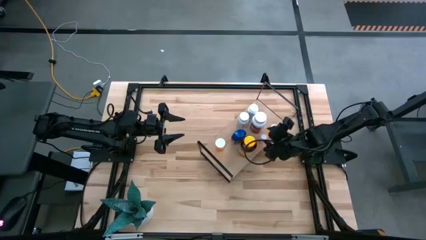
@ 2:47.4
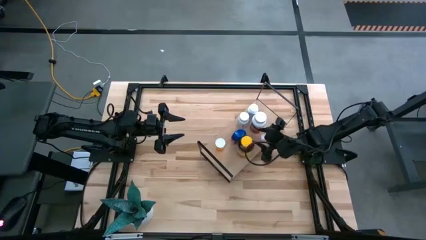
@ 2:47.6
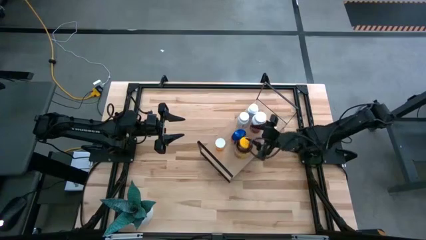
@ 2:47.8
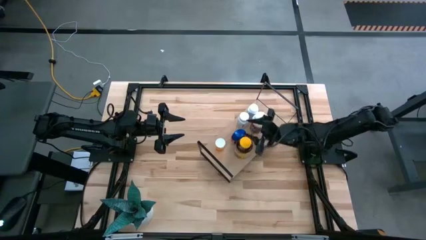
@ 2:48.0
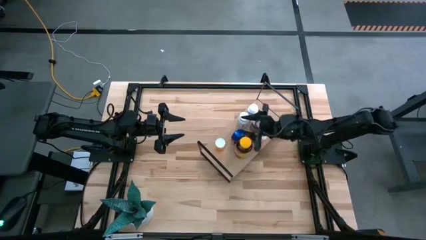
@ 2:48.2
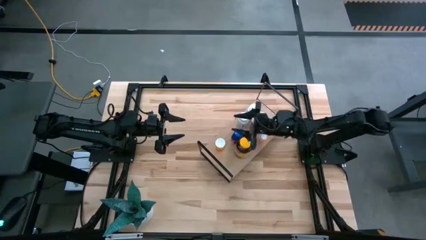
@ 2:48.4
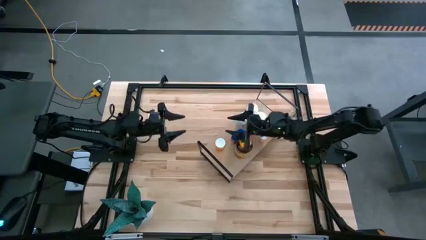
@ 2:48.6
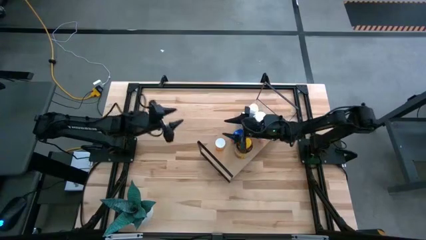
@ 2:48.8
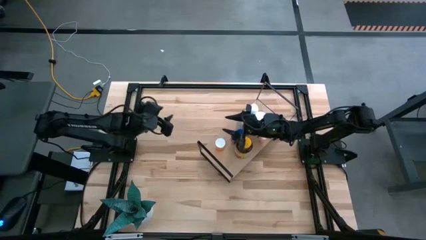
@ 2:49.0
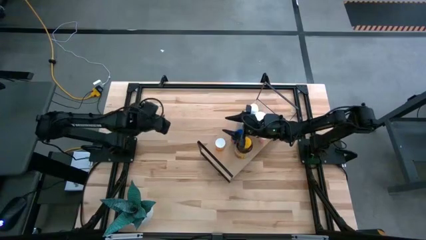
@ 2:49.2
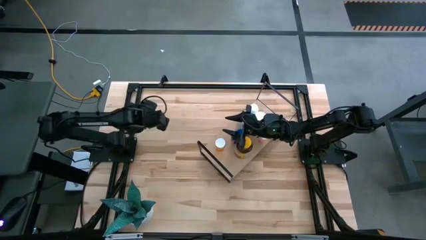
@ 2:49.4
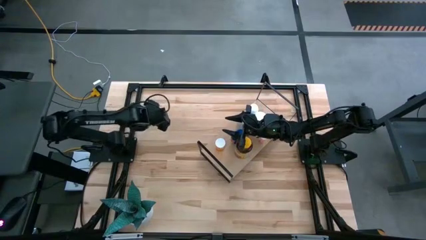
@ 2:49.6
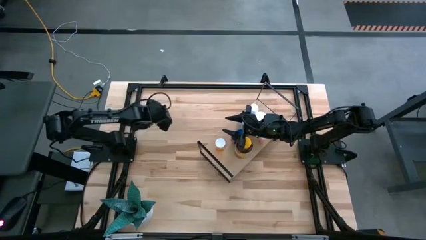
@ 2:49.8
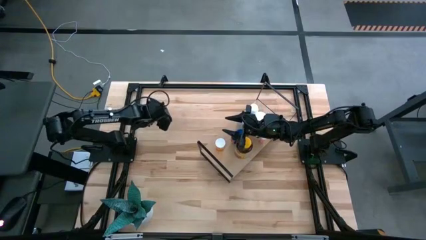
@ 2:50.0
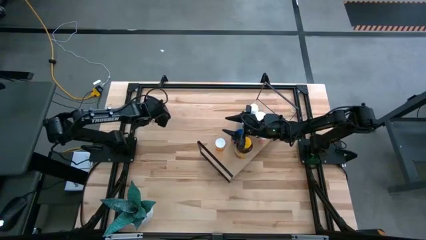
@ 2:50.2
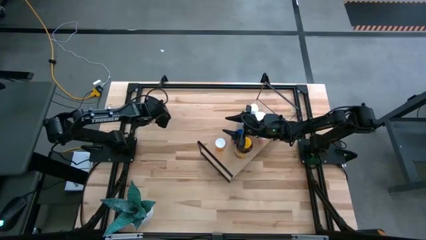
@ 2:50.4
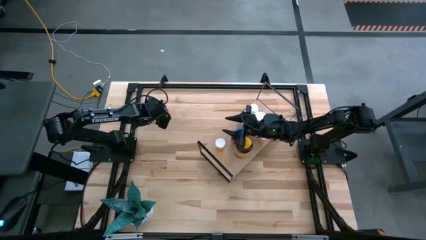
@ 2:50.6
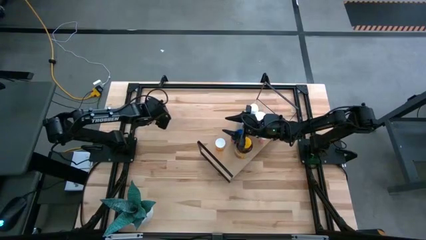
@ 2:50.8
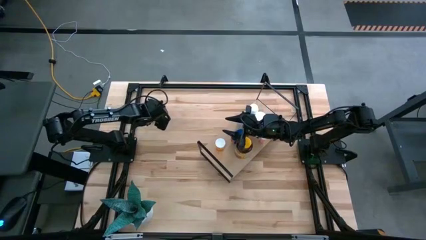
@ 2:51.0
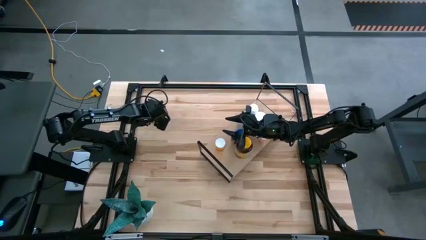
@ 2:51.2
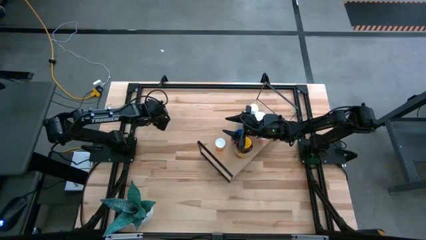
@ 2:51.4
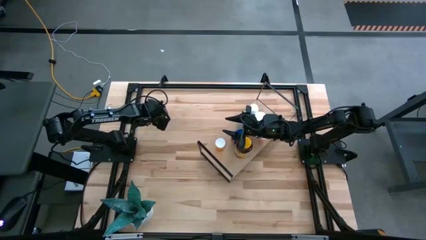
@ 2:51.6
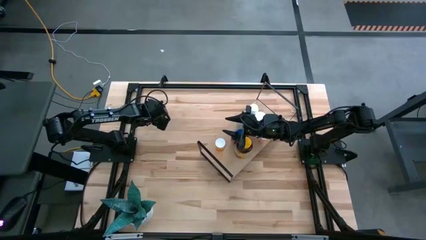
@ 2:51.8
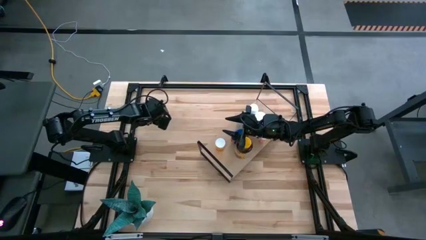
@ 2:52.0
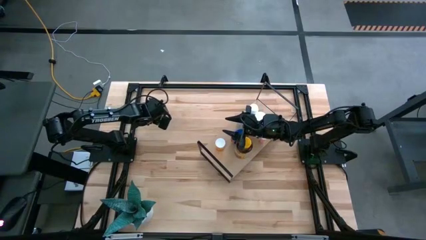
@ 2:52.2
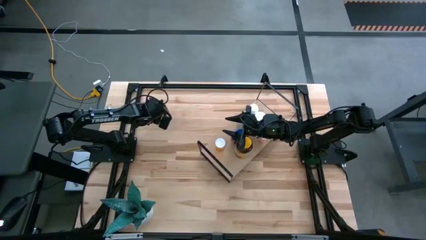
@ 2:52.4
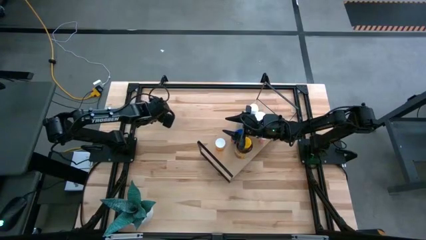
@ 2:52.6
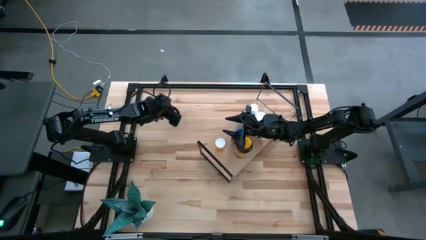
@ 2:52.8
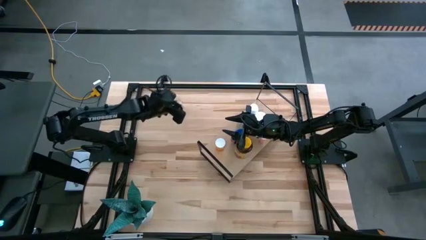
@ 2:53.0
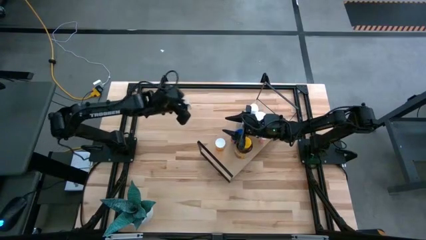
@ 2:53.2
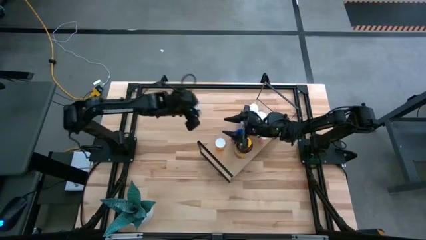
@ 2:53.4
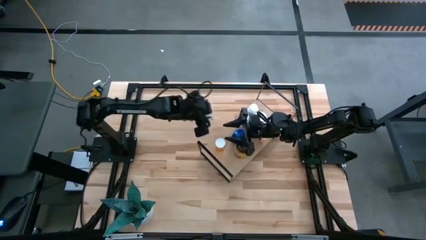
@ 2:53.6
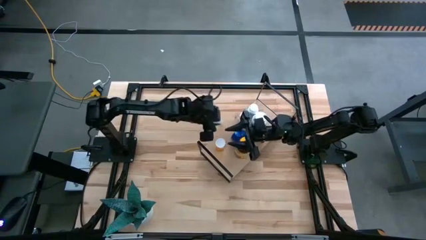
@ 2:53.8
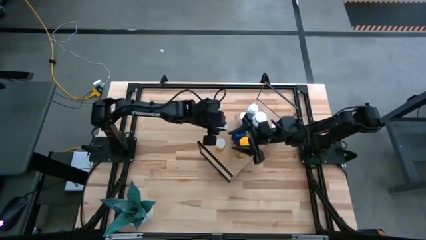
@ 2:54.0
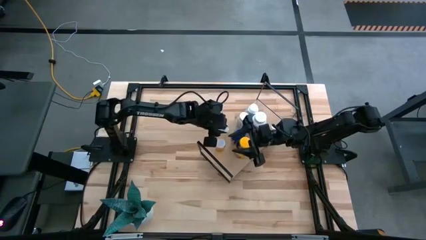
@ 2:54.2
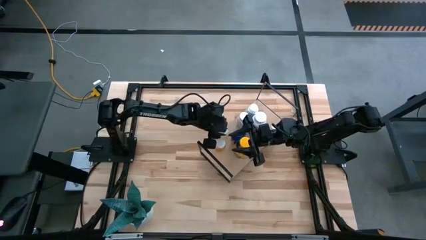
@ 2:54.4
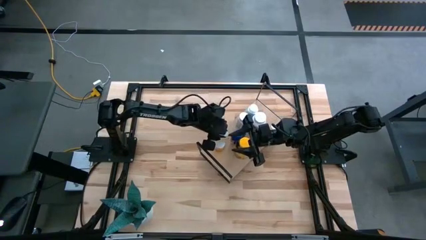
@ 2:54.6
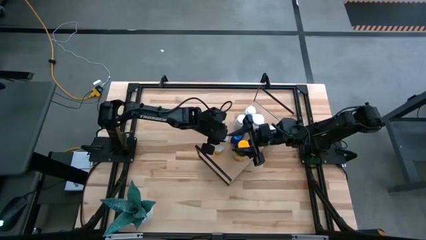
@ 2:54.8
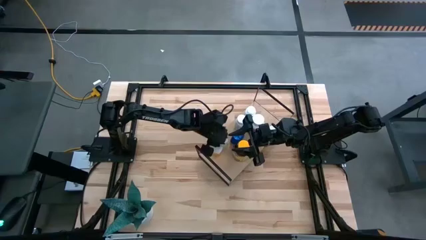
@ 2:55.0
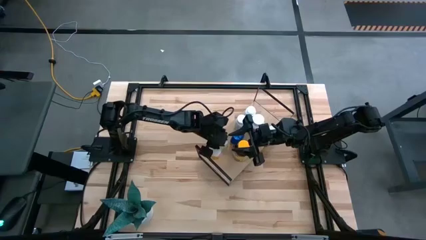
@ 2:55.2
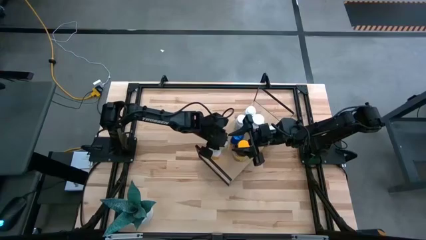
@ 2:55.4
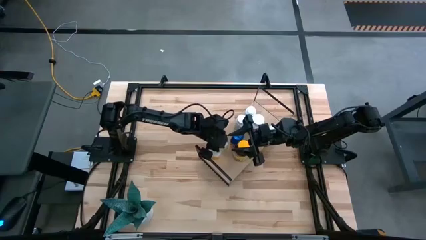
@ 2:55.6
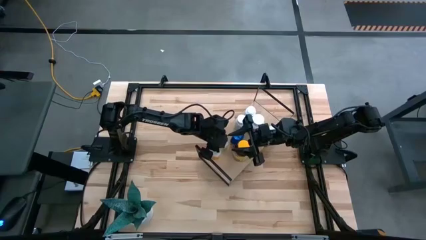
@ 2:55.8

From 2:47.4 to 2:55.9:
Task: Pick and place medicine bottles onto shelf by color
Put the yellow pill bottle on the shelf

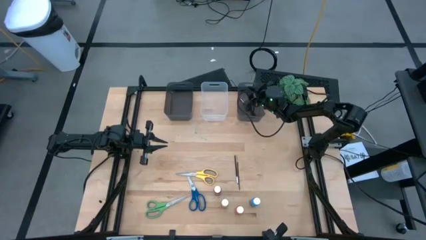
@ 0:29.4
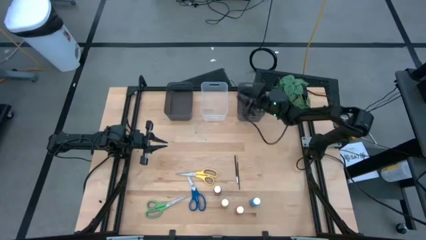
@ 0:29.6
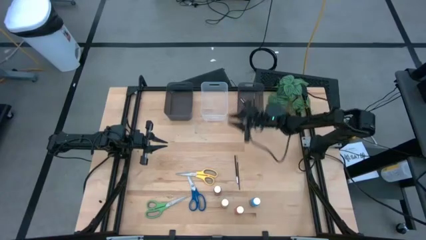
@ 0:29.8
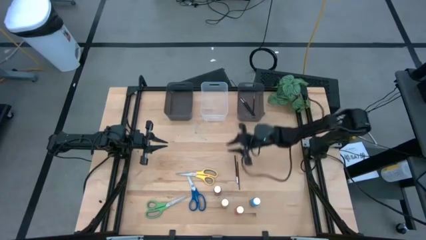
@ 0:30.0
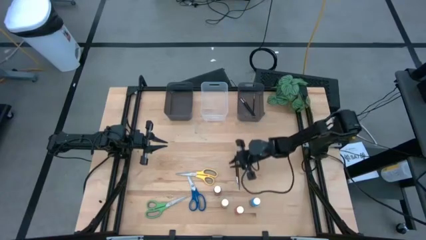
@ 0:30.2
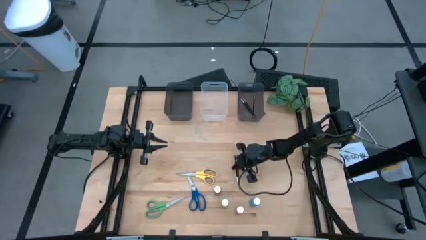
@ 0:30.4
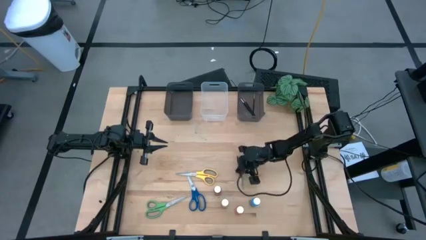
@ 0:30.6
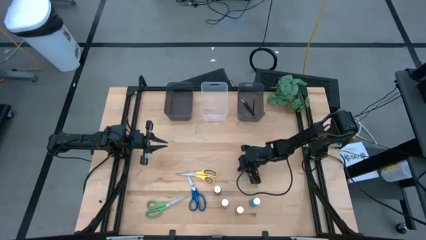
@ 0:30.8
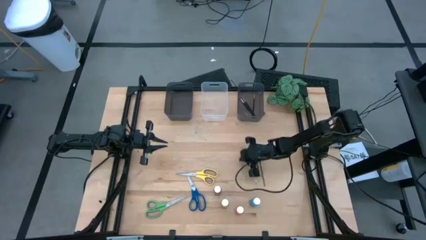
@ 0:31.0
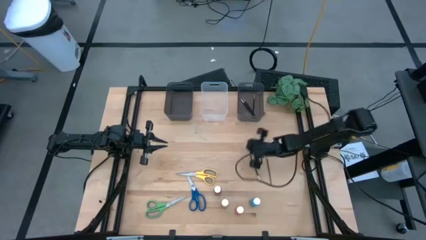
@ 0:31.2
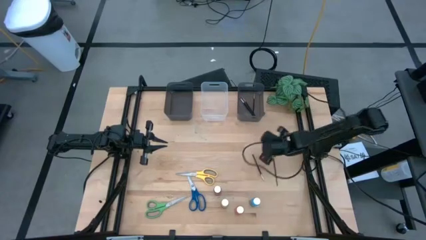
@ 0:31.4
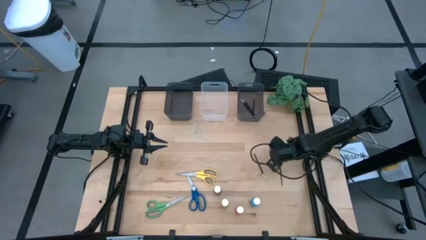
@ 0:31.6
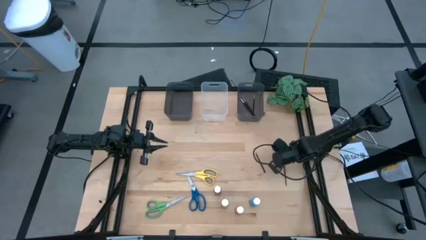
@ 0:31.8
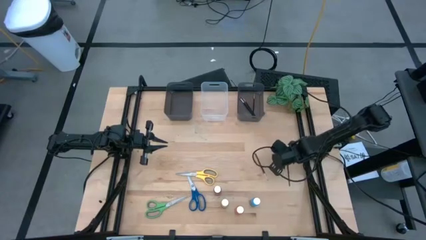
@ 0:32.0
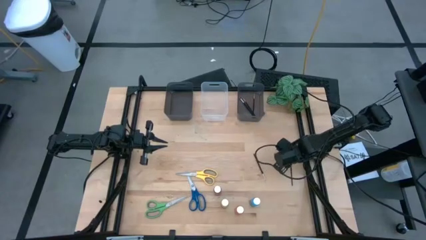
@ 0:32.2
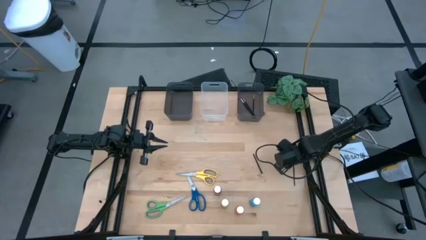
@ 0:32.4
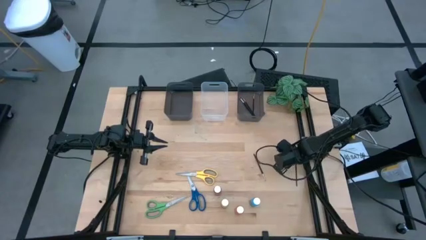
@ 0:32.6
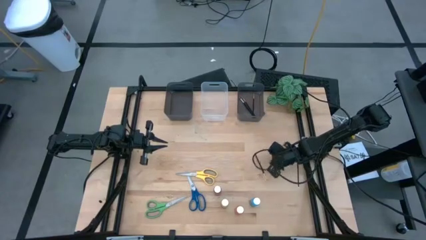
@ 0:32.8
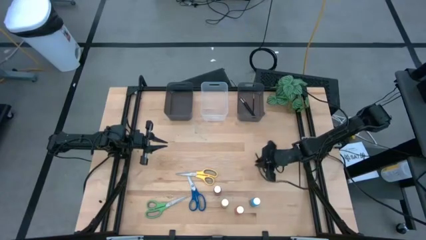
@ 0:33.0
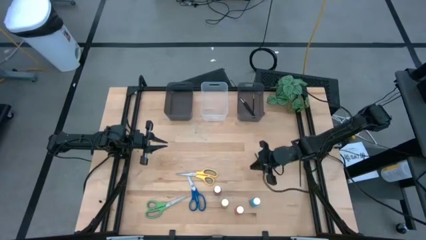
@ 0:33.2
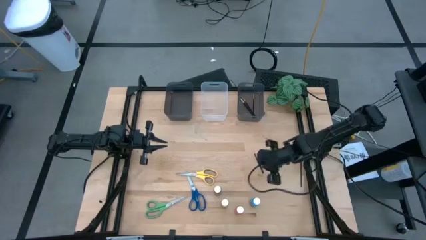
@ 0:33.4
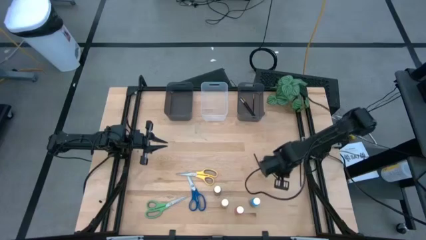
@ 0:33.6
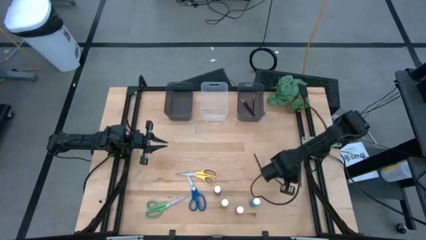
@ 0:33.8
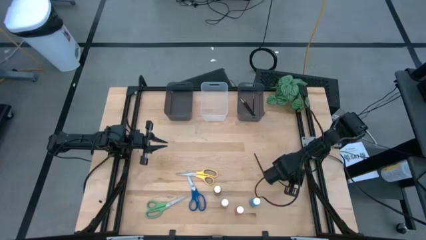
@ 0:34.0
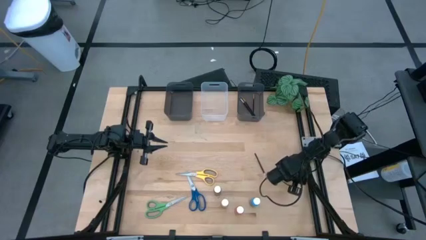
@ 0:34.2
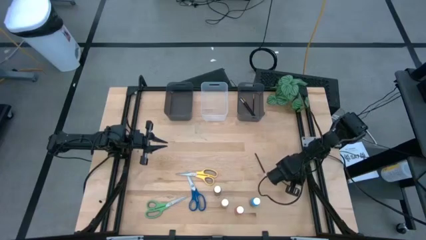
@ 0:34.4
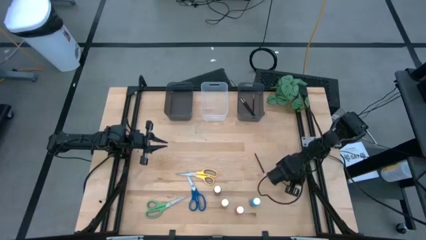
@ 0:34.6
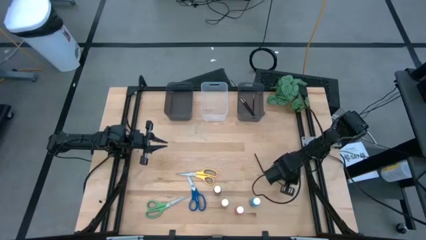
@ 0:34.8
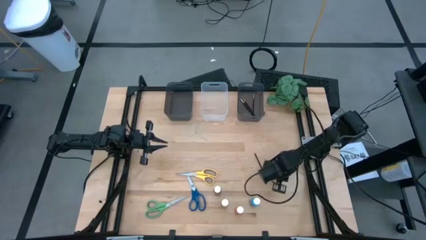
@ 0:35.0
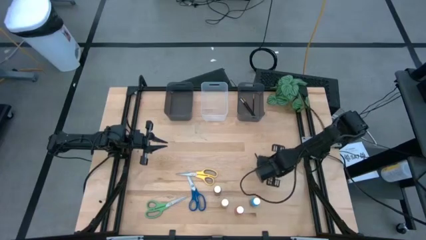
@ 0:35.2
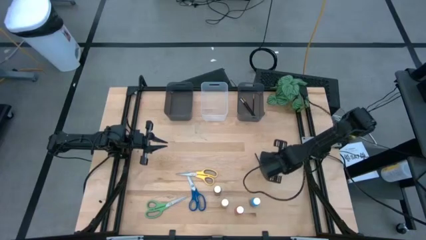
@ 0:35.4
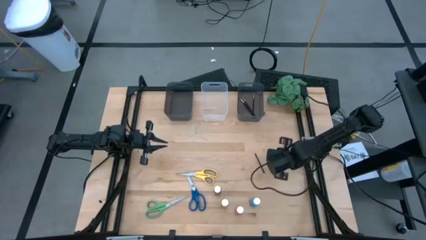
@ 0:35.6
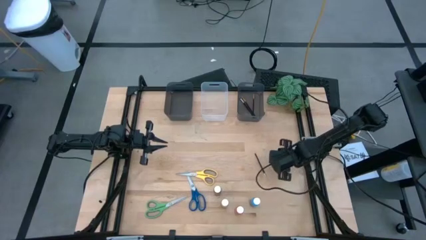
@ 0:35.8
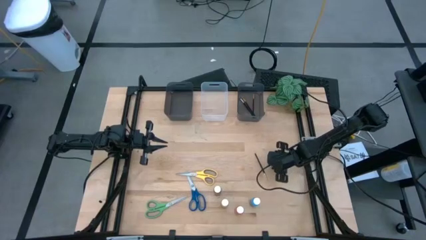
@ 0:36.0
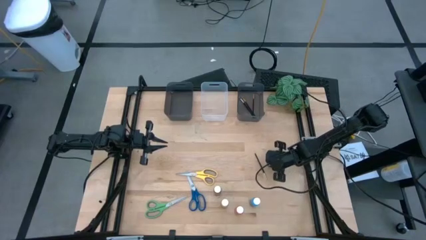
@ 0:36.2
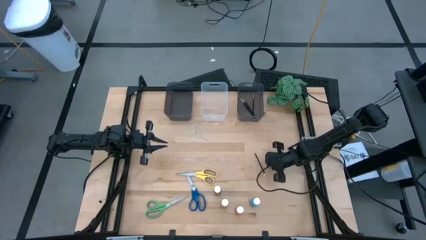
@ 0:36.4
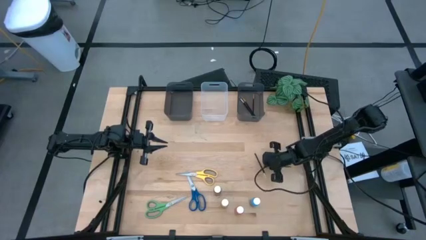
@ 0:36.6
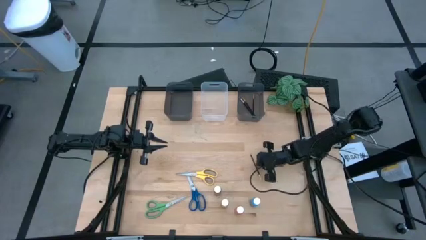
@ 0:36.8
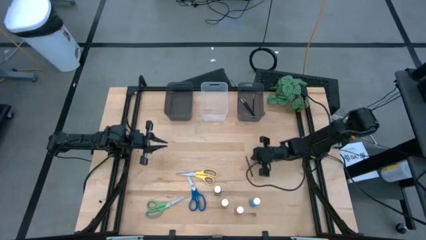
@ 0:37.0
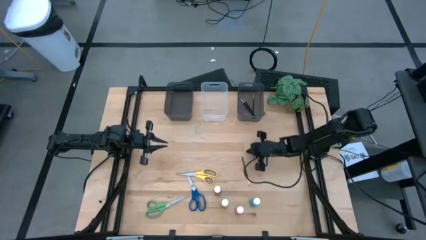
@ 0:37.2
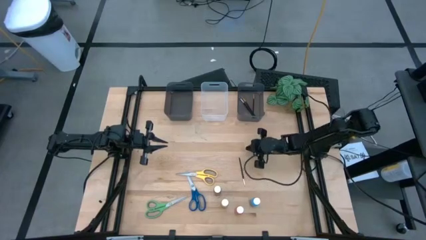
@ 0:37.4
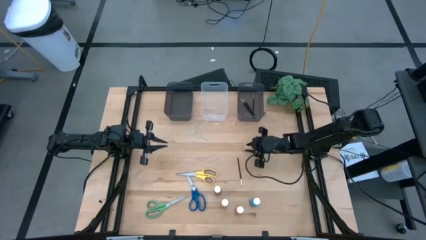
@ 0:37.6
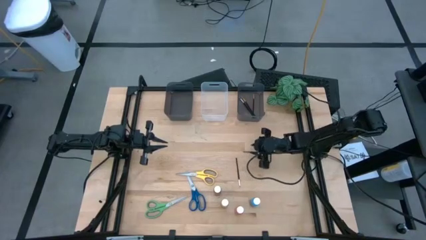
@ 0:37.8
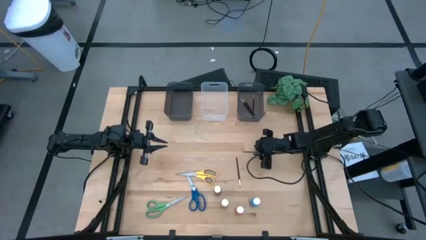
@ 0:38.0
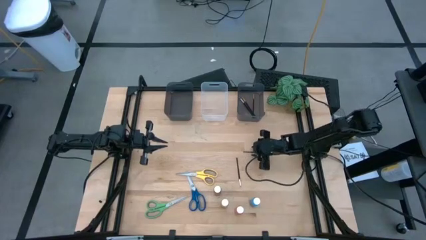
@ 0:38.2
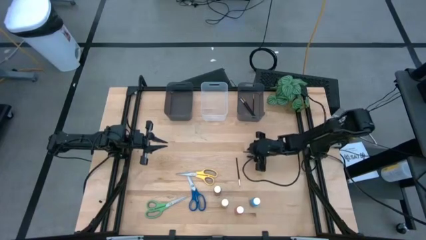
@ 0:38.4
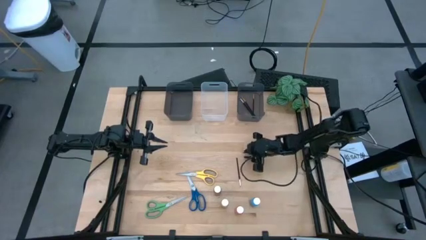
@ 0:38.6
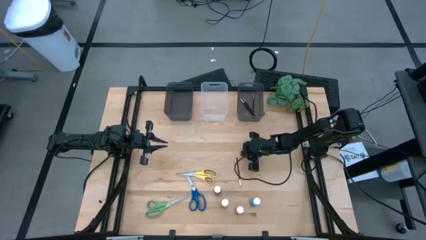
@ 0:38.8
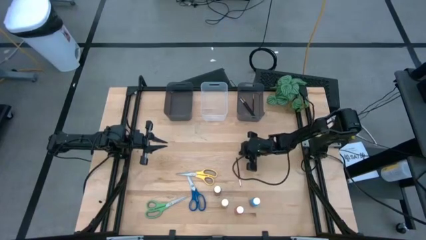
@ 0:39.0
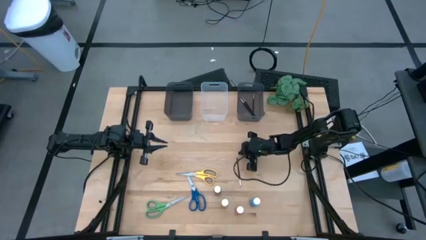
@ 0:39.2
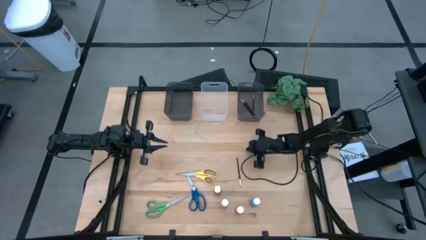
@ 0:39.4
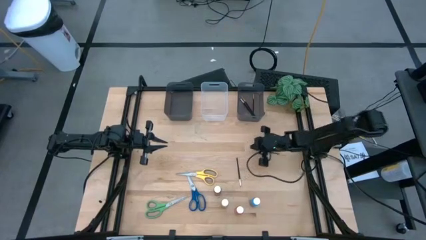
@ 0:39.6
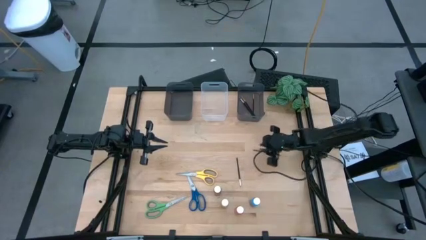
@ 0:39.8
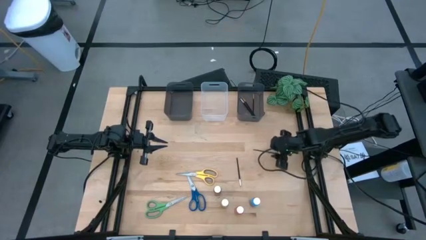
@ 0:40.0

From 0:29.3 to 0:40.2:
Task: Pick & Place Paint Supplies
Put the black paintbrush into the right black bin
